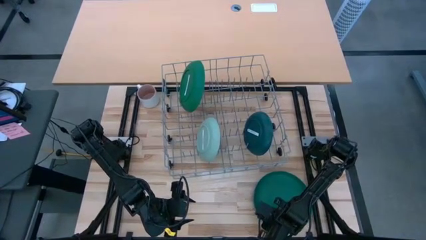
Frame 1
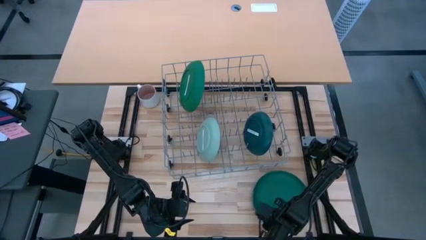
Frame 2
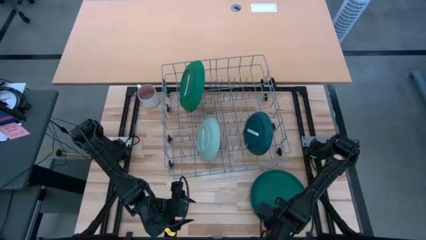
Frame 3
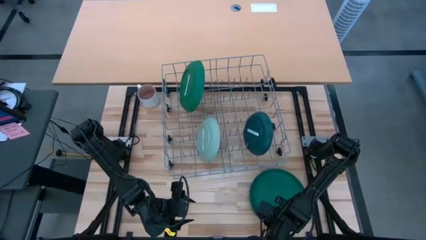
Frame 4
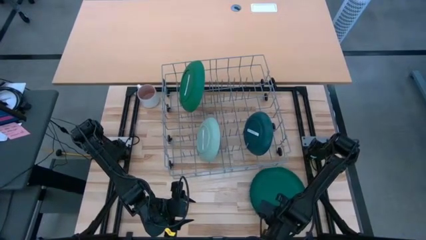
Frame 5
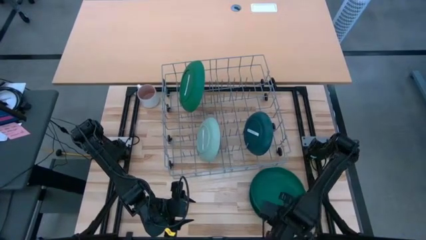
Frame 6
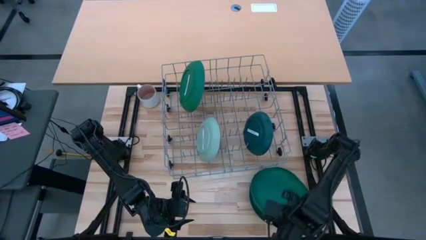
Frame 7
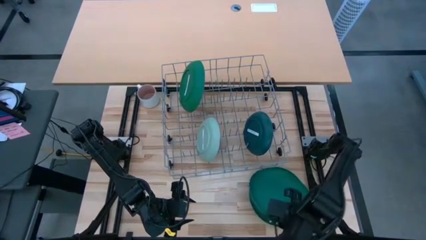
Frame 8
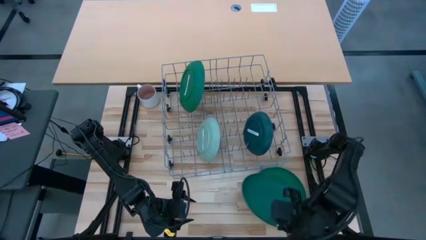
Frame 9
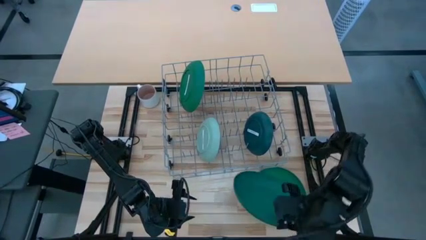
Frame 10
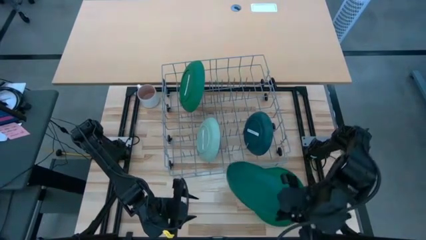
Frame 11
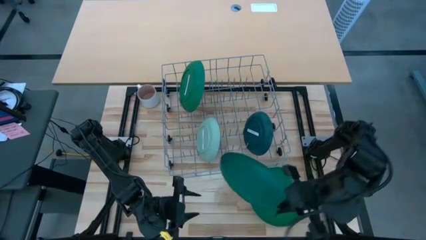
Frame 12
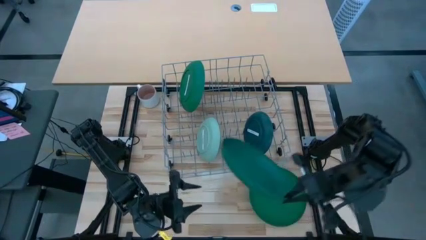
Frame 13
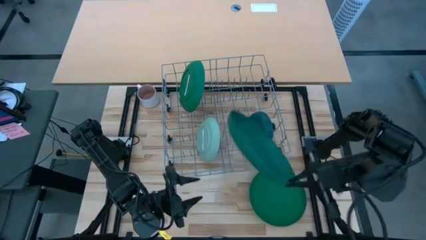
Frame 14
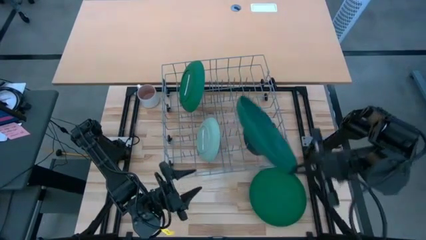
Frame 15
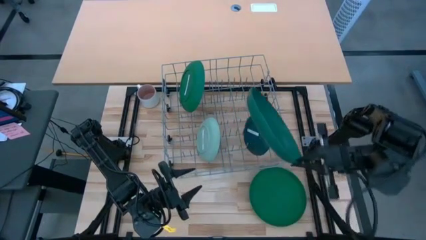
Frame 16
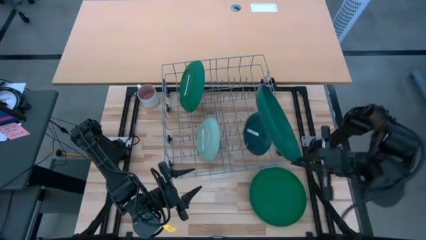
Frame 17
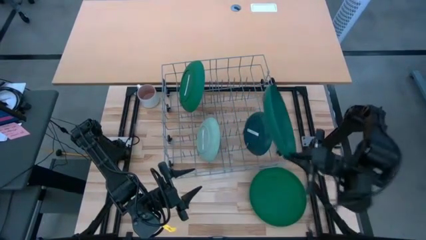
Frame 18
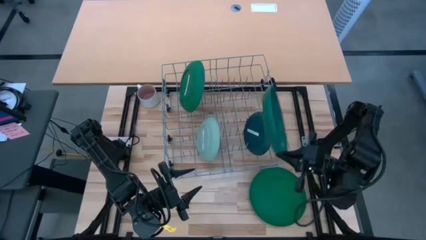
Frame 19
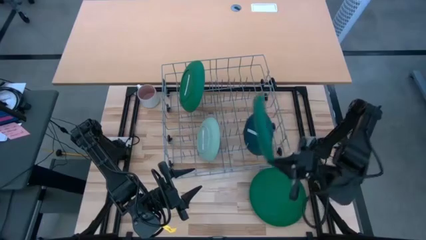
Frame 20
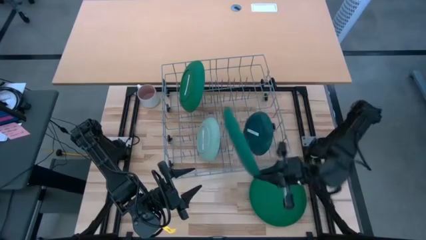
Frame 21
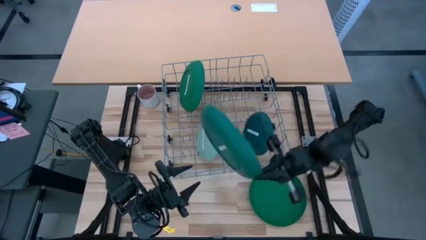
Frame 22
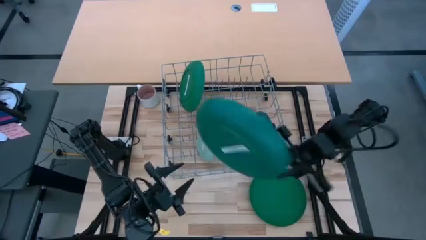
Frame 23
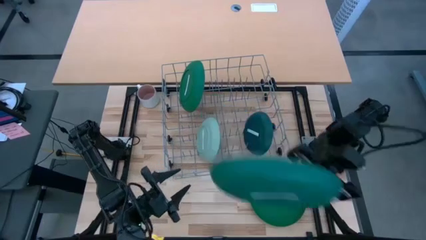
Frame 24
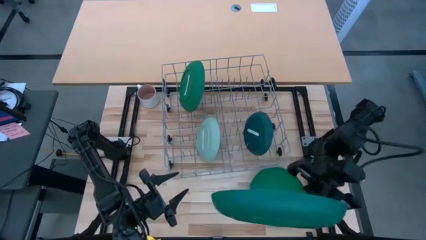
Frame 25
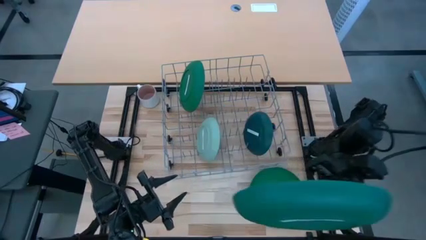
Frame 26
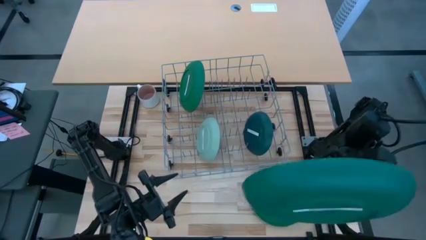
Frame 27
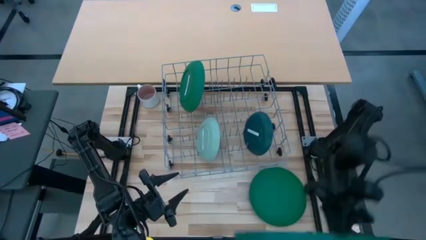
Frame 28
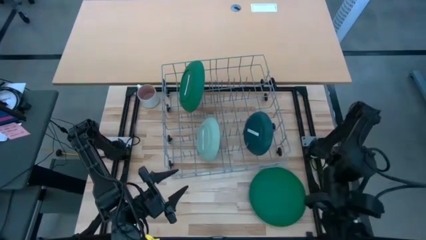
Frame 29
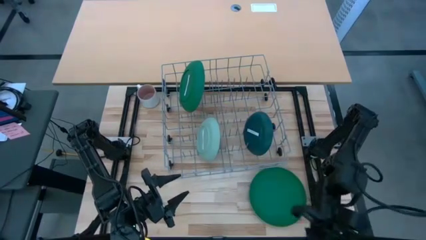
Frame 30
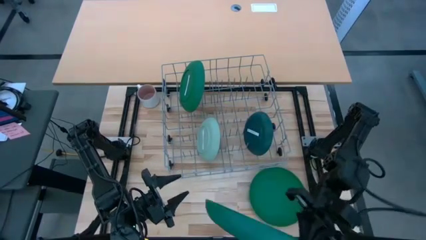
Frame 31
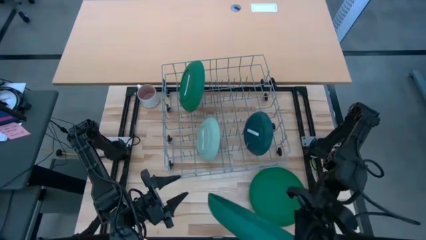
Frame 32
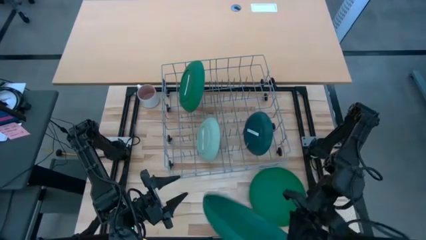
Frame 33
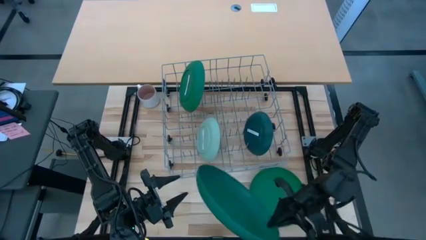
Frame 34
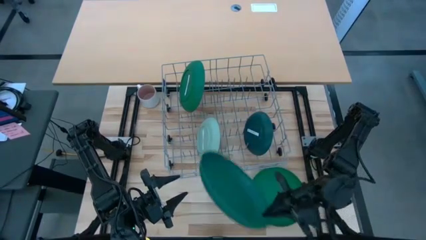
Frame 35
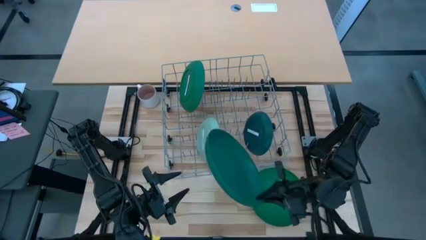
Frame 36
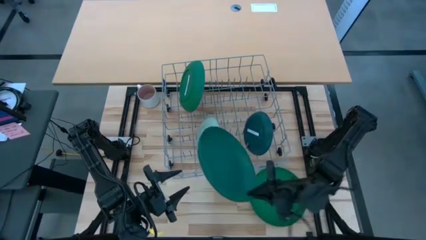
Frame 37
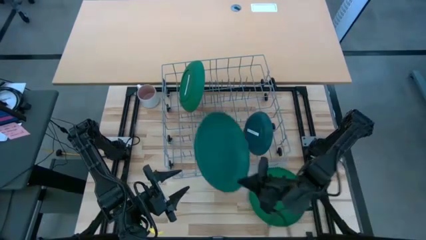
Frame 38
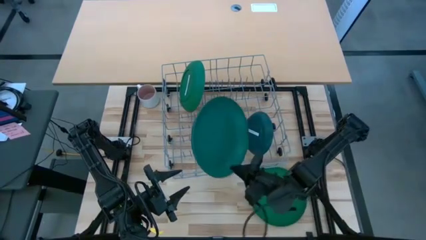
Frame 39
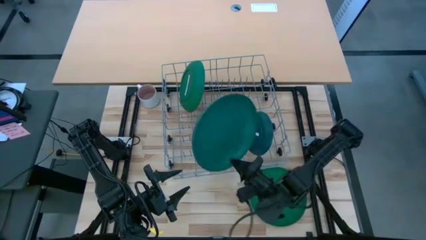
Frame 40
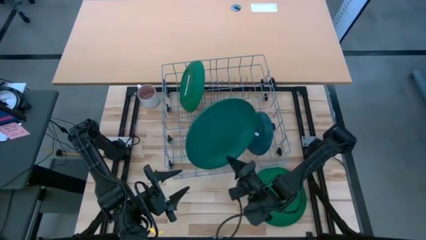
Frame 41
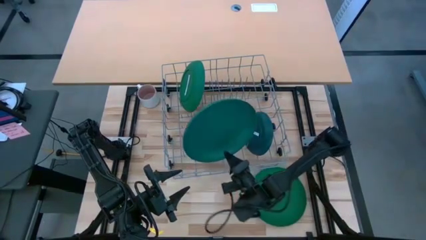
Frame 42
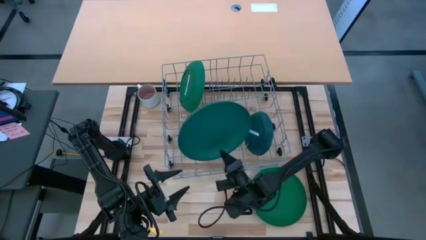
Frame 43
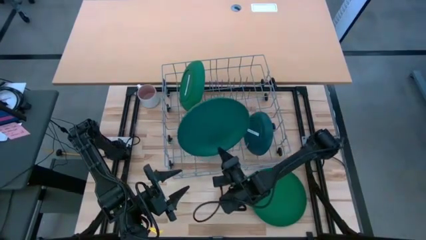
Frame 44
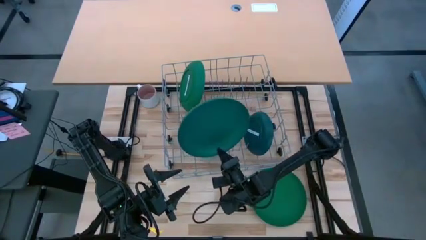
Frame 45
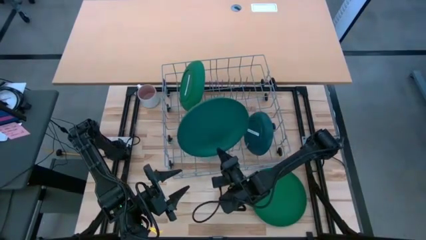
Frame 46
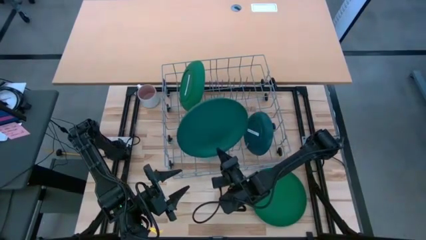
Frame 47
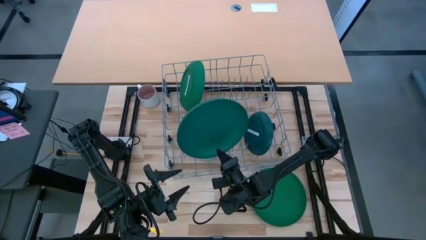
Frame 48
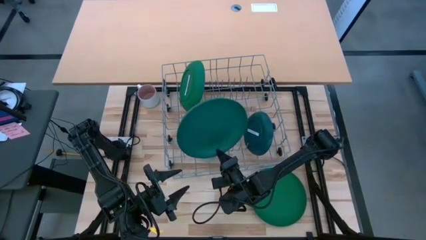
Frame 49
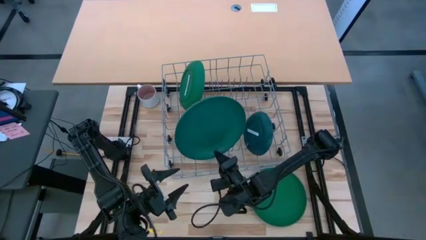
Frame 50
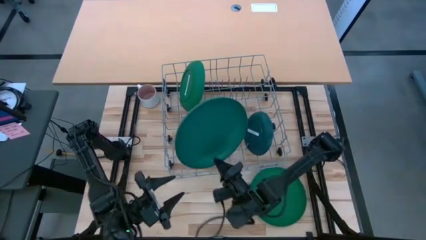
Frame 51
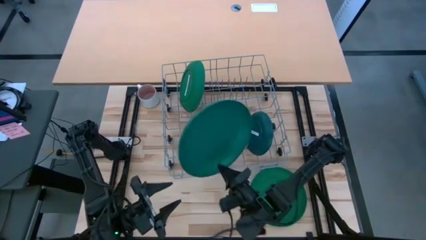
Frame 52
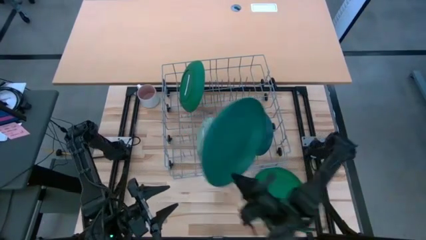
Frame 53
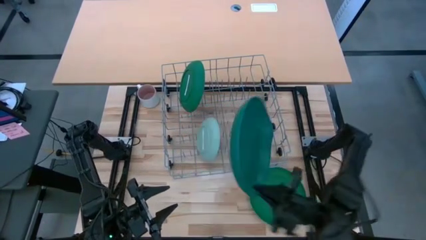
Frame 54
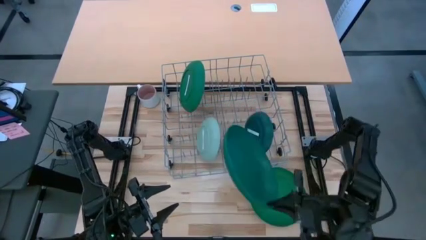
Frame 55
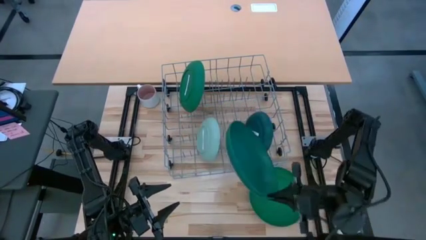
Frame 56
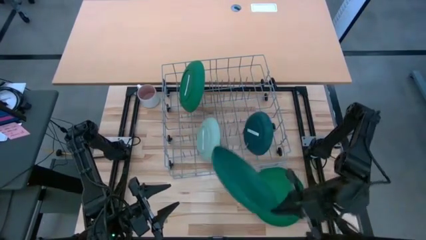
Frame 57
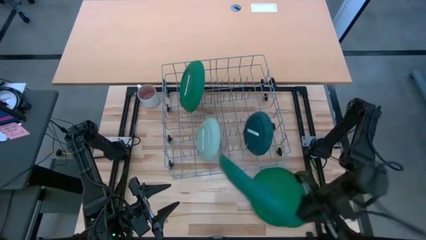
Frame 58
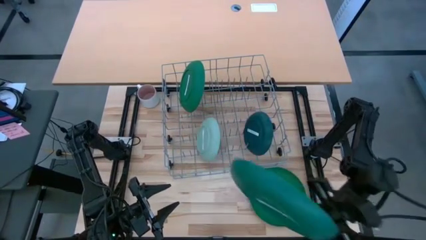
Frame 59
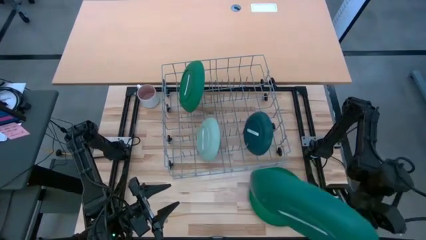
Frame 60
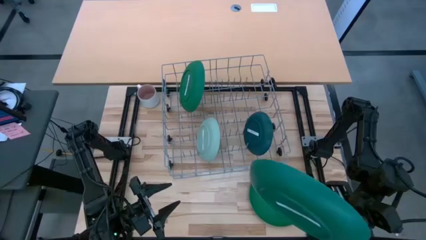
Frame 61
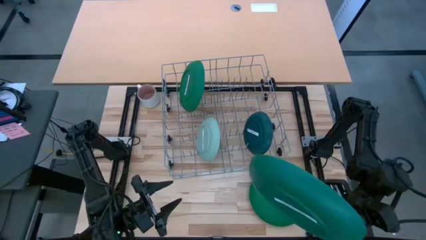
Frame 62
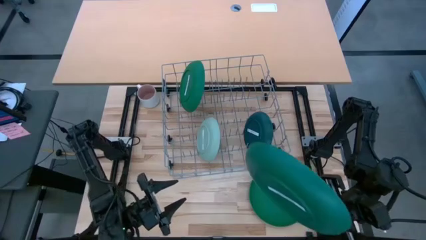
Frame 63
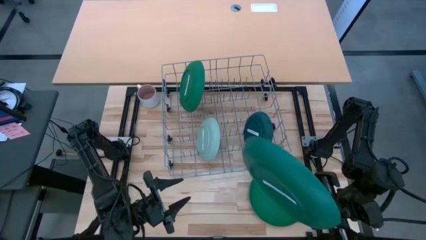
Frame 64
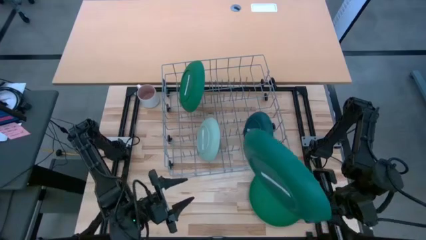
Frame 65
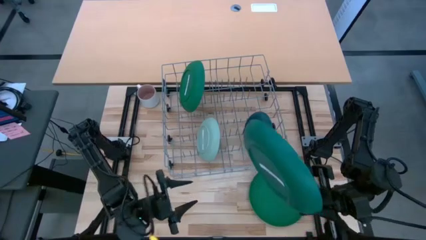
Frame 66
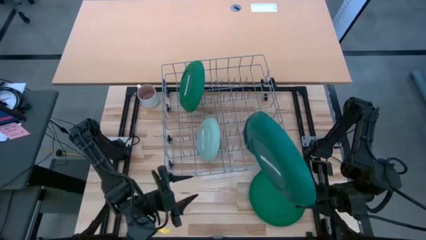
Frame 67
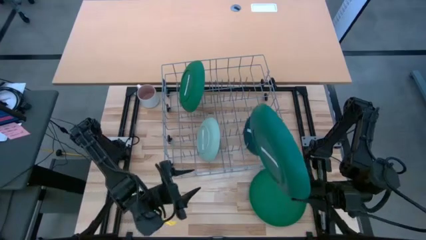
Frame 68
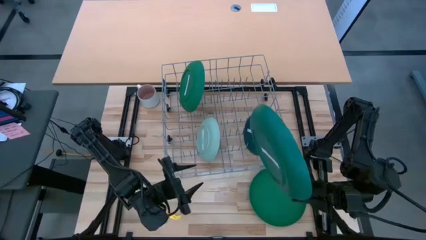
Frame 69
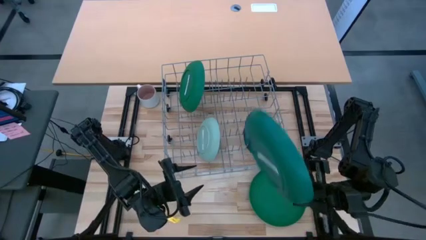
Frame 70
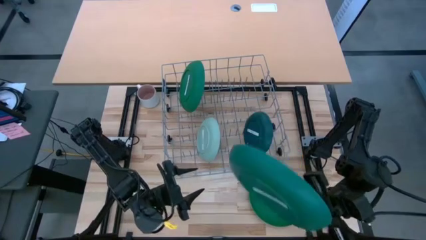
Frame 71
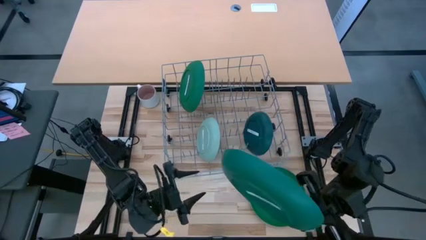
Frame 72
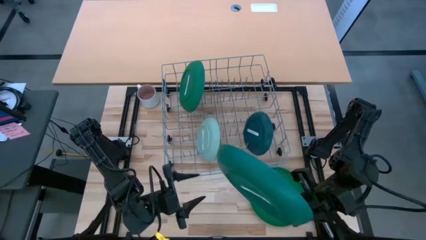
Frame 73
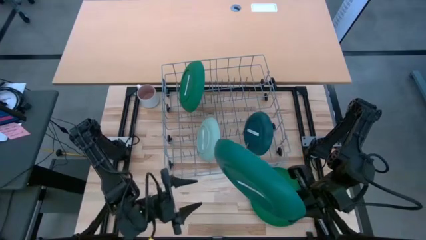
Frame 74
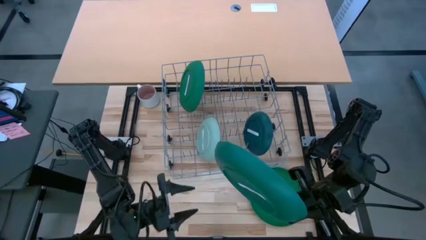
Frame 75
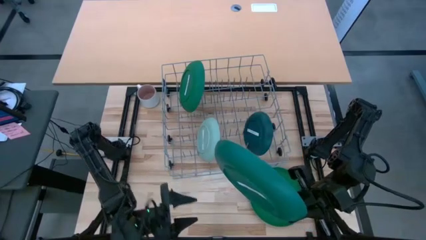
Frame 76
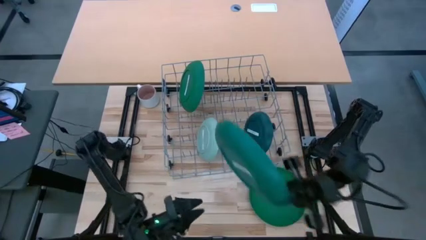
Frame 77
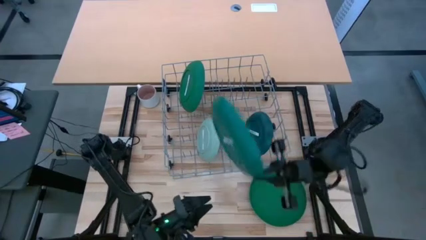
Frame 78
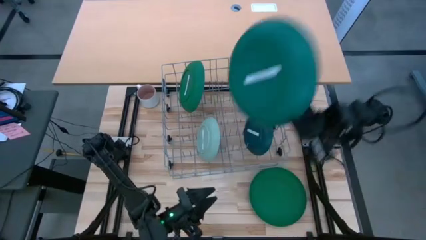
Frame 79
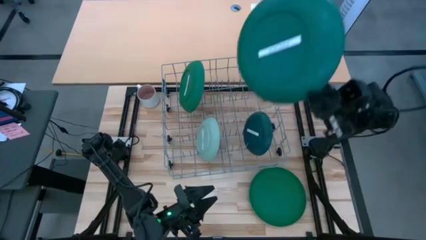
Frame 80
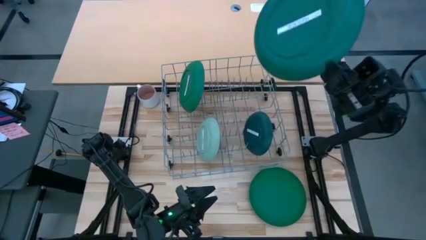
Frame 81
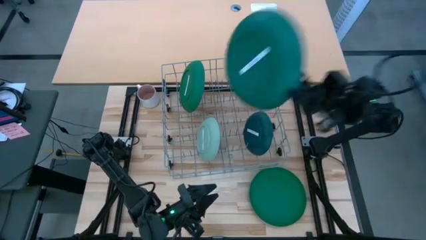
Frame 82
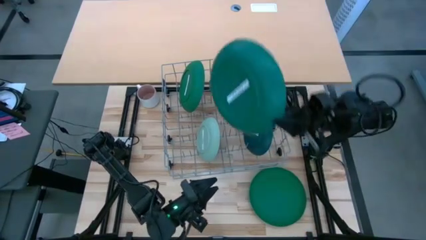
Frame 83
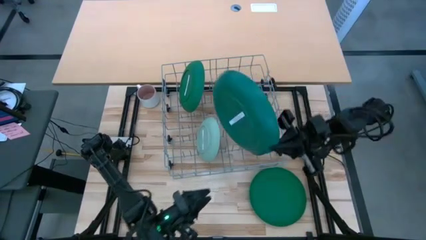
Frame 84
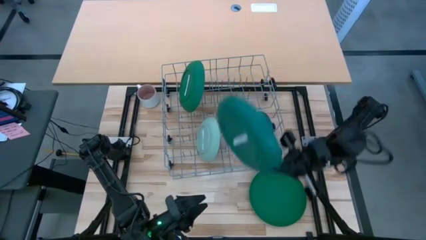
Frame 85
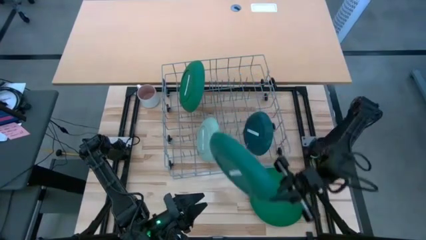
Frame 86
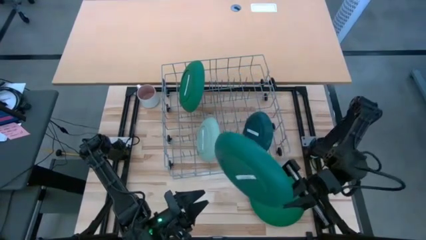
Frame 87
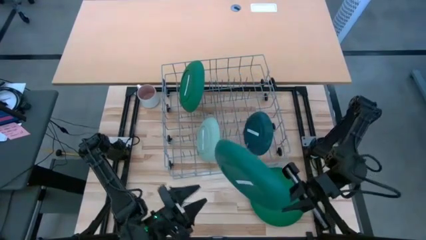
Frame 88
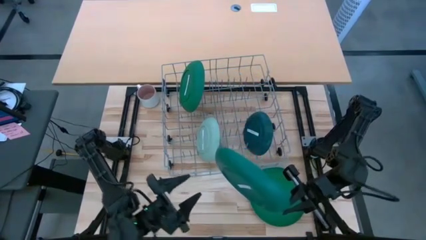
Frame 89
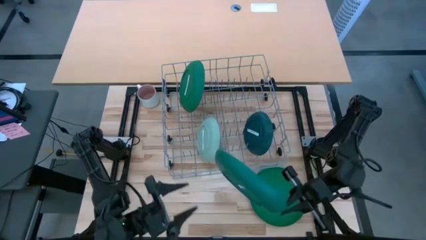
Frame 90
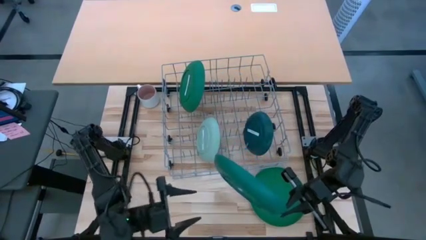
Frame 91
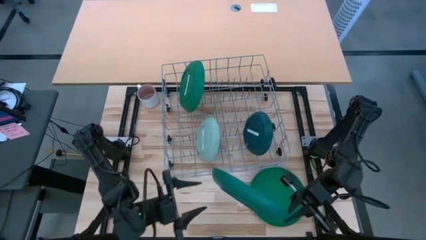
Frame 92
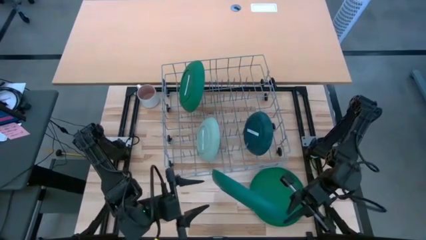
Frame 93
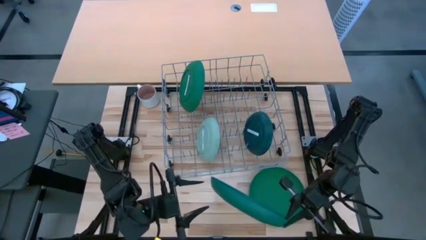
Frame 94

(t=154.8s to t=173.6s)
Task: Sort dishes
Put the stacked green plate in the dish rack
